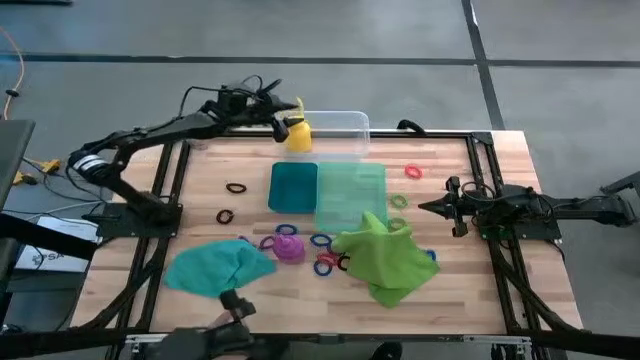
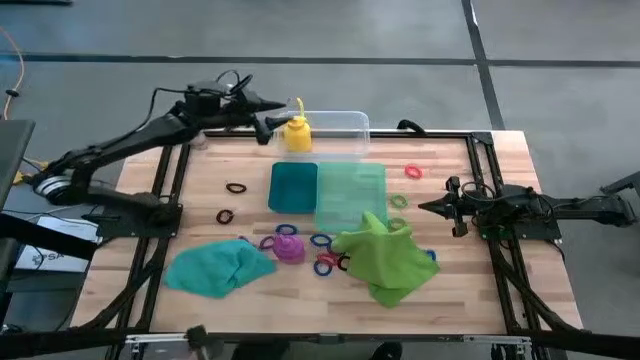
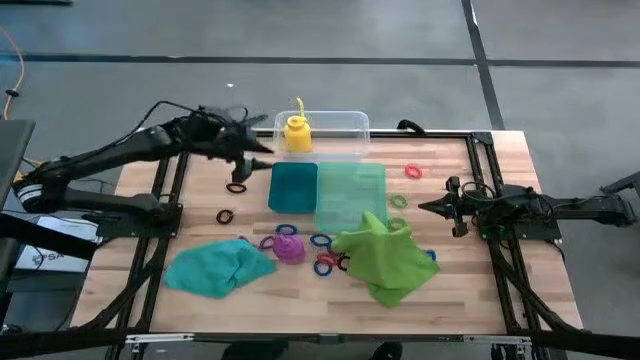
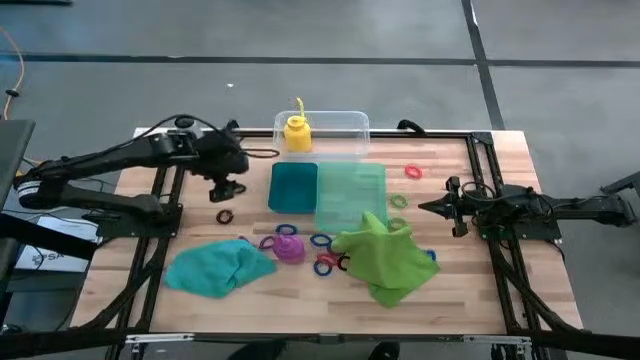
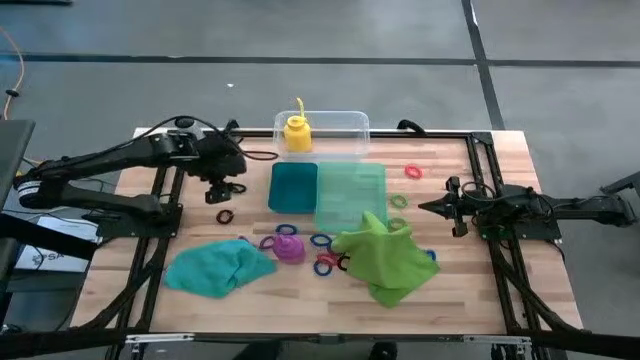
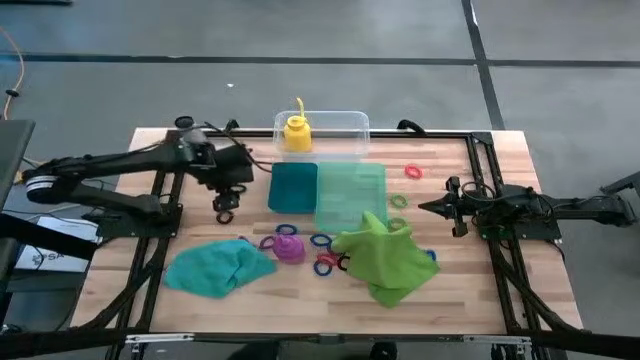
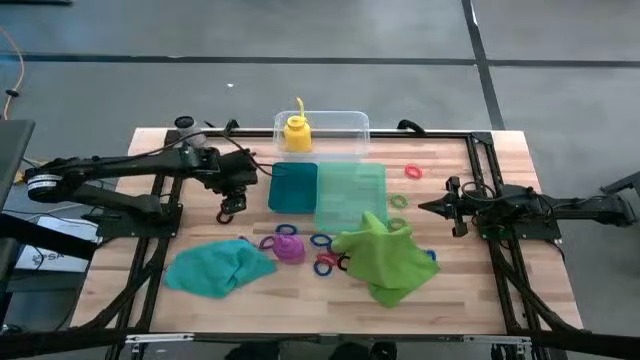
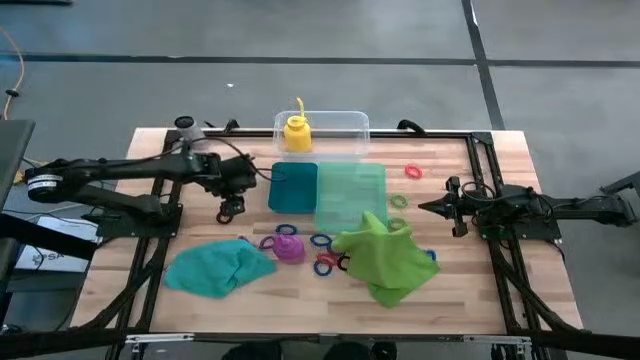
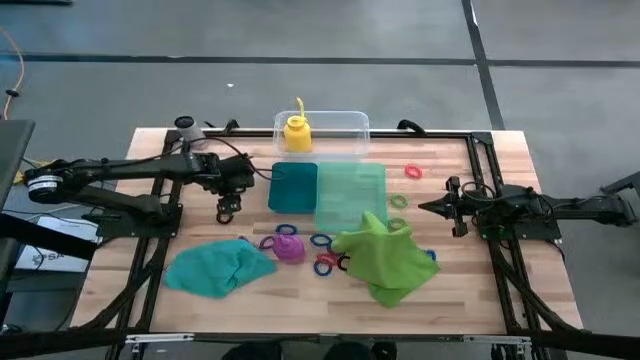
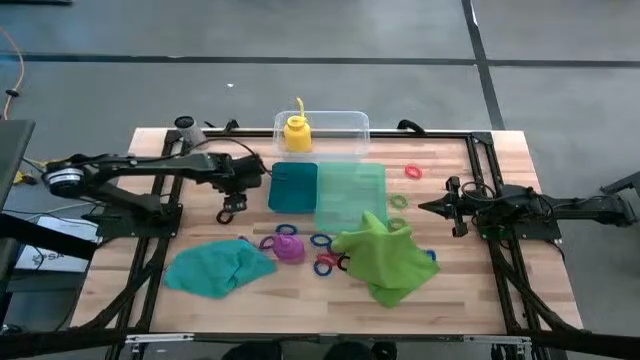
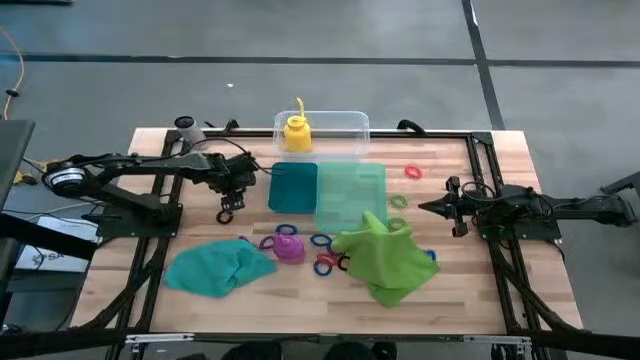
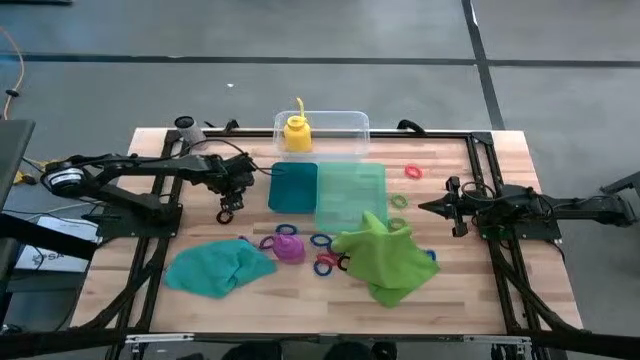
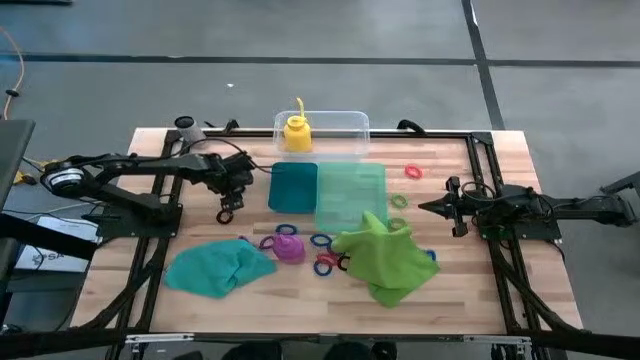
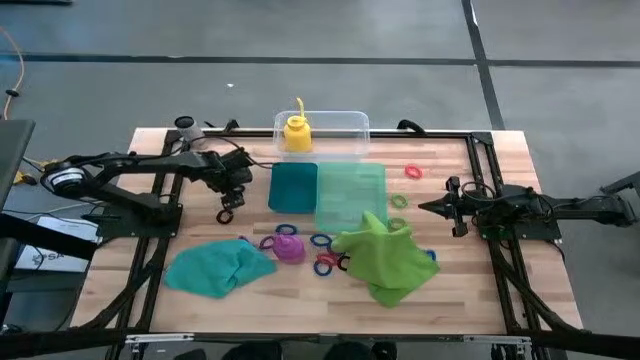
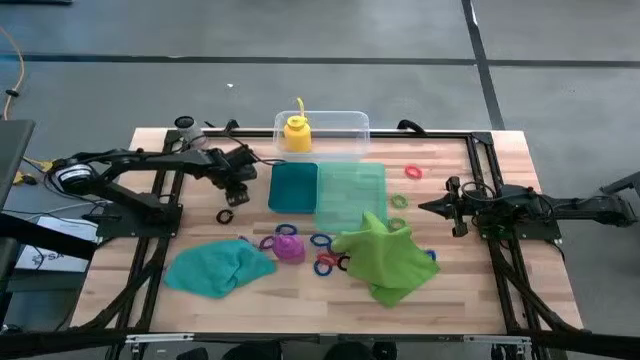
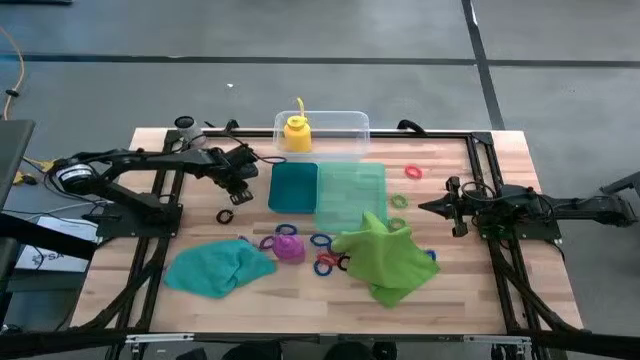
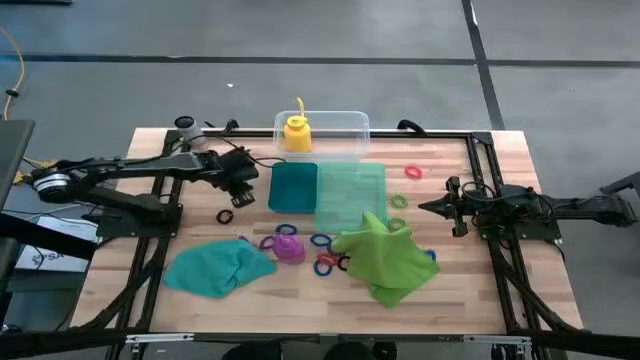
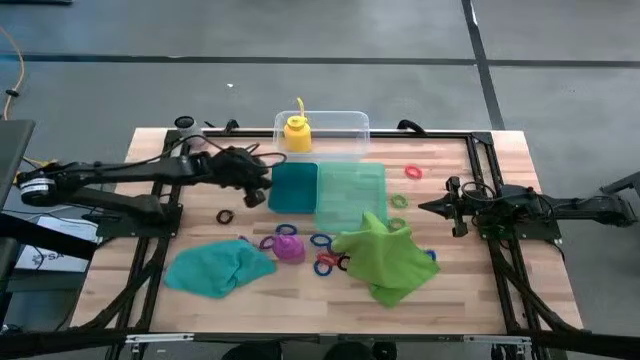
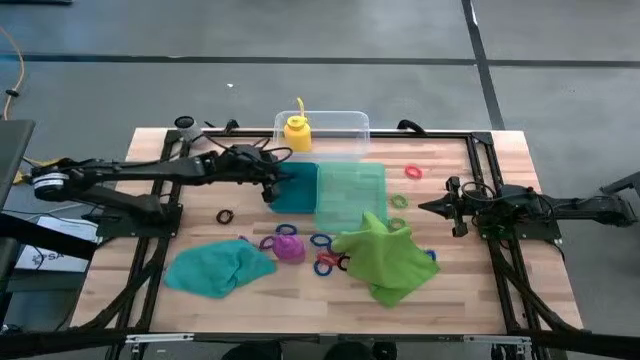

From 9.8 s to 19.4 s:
Task: Pick & Place Sports Items
Put the black spring keychain into the blue bin

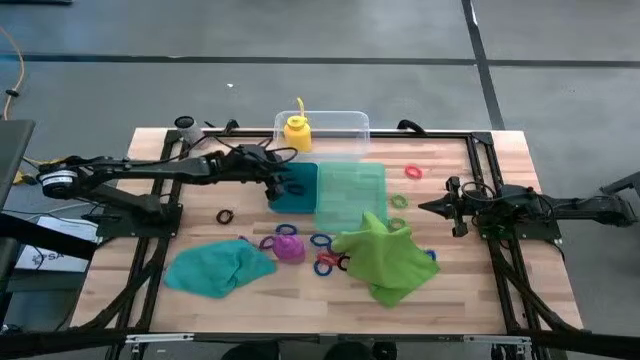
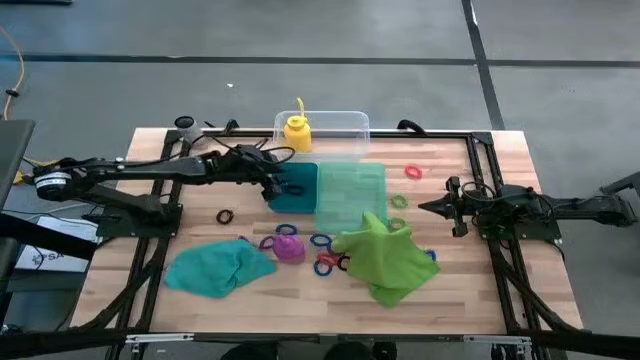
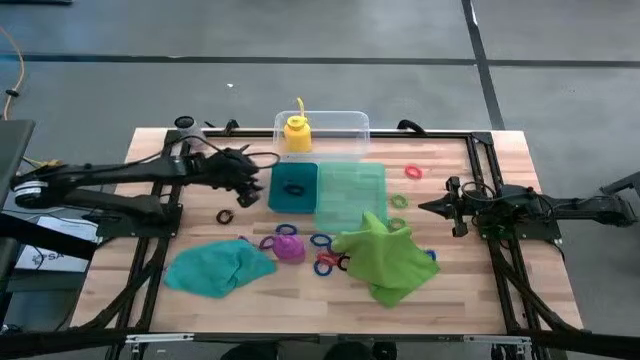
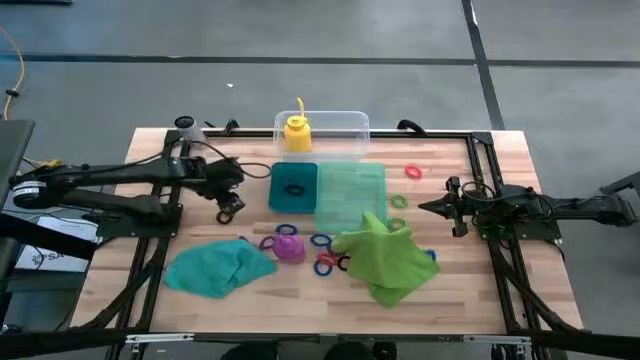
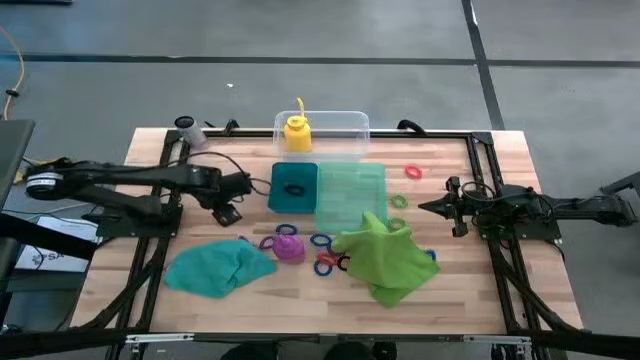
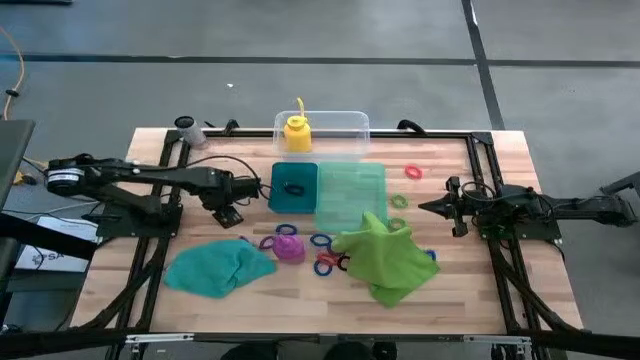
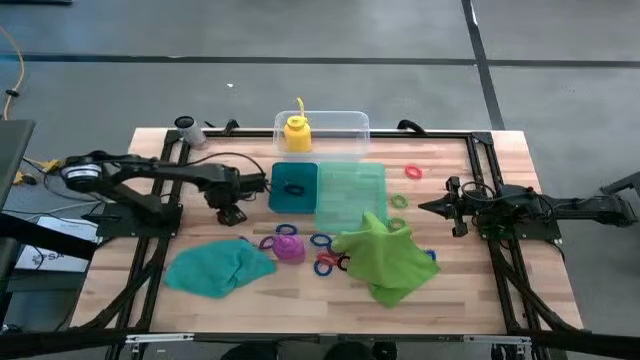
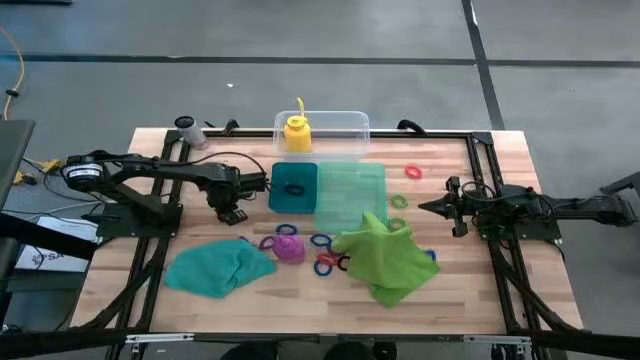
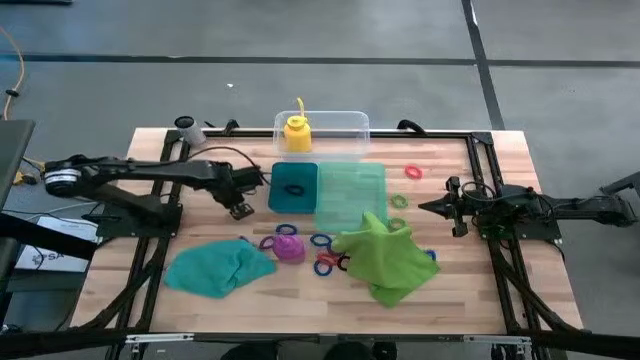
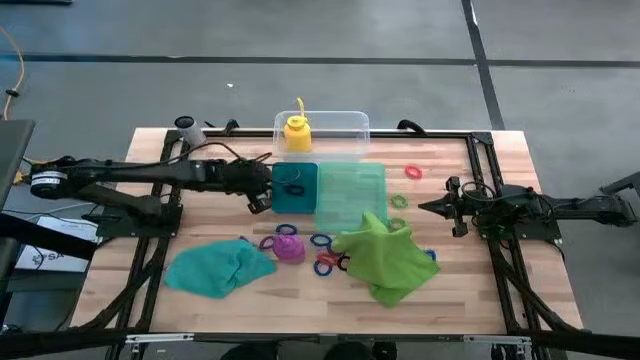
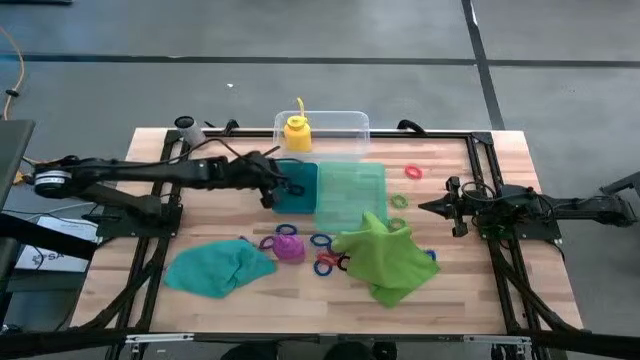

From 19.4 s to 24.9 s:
Put top black spring keychain into the blue bin

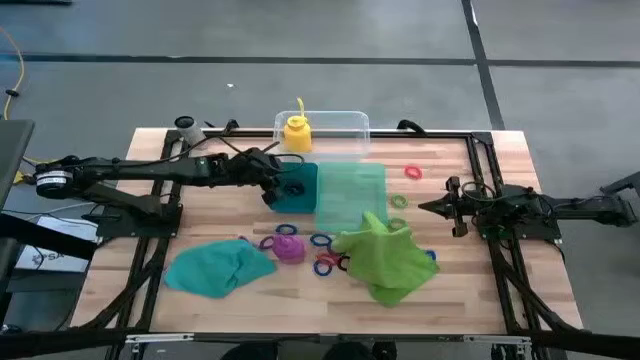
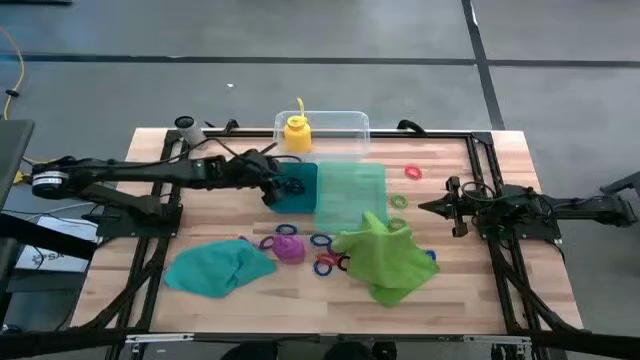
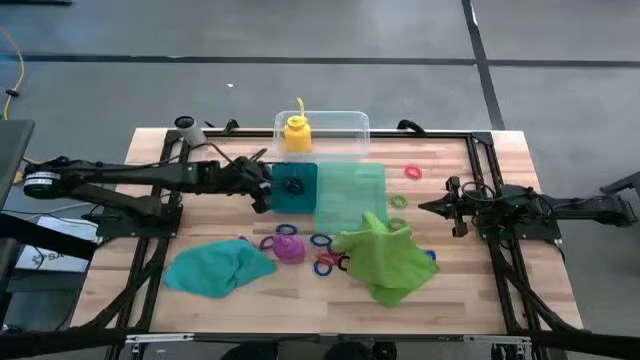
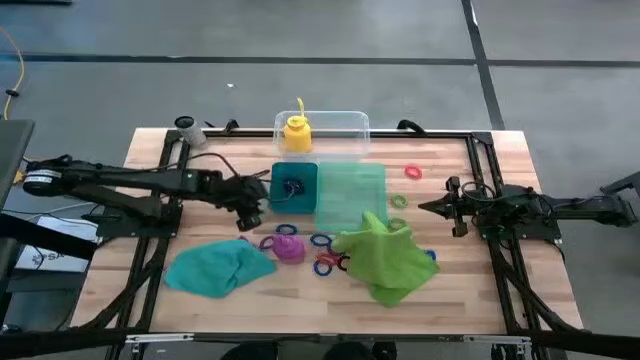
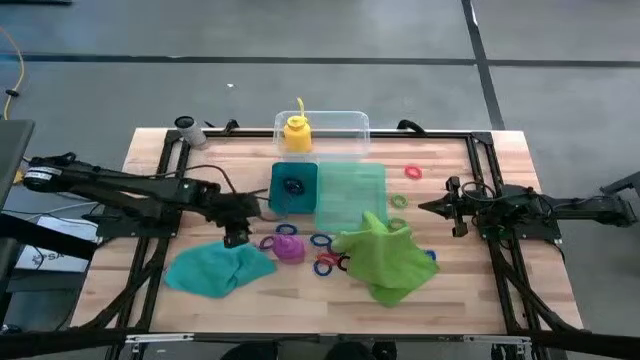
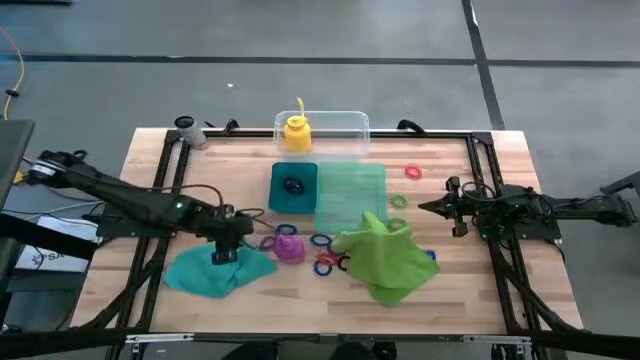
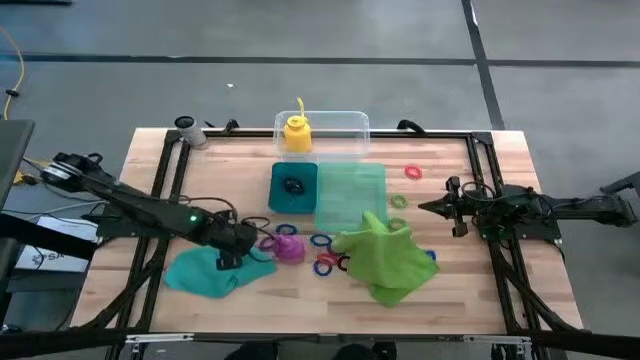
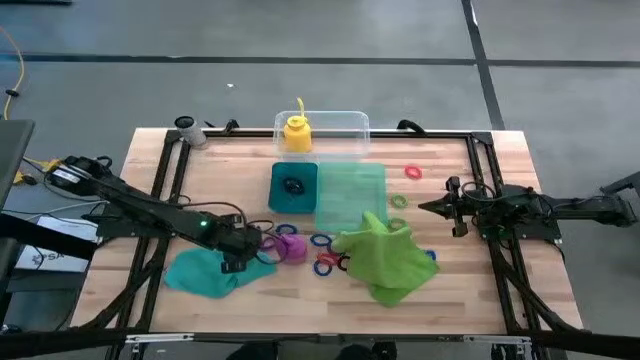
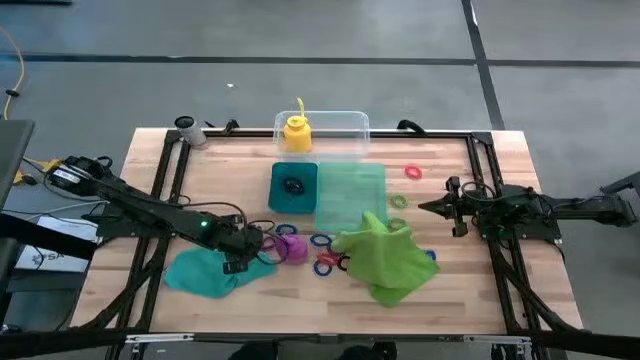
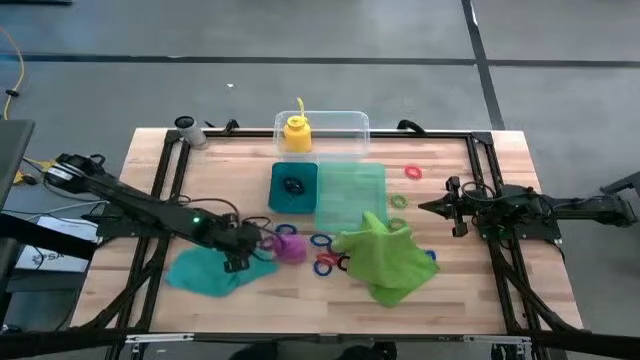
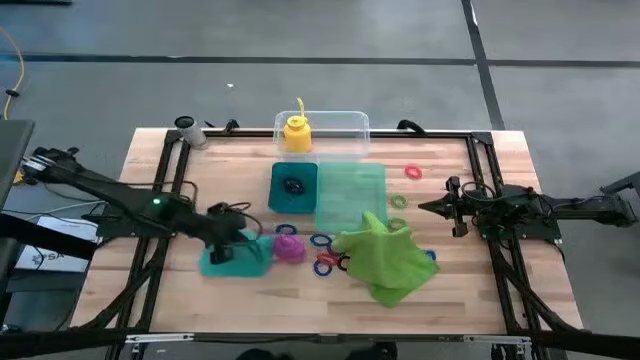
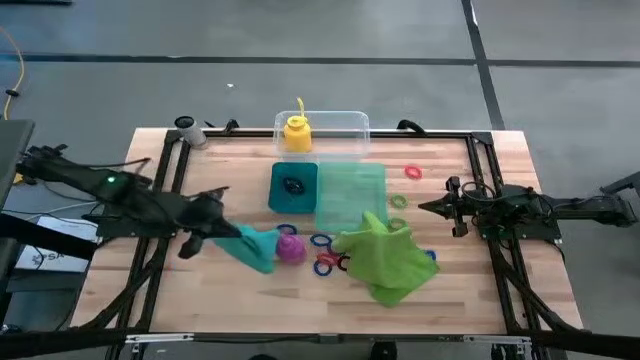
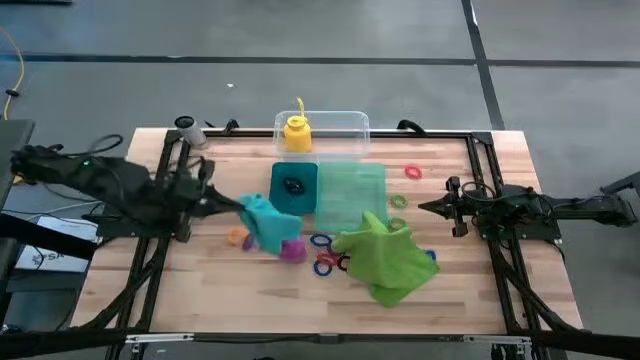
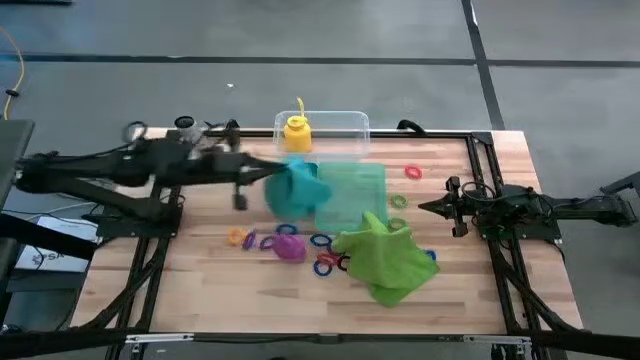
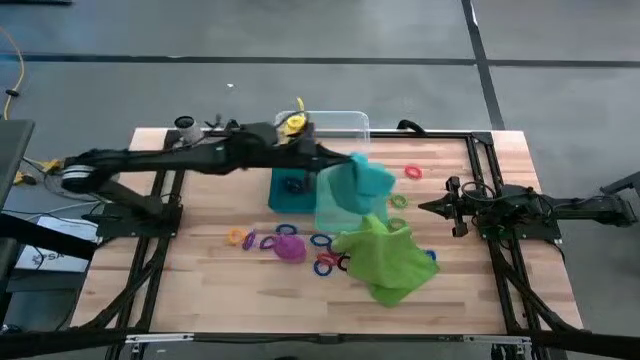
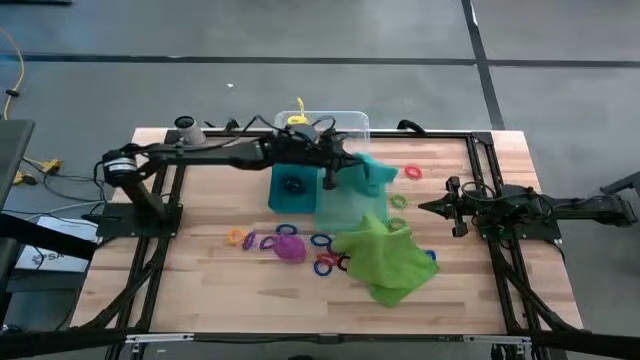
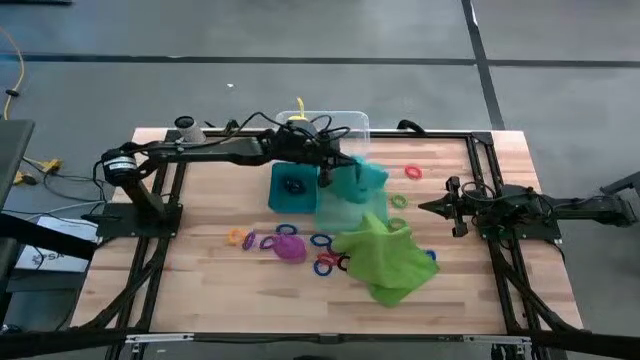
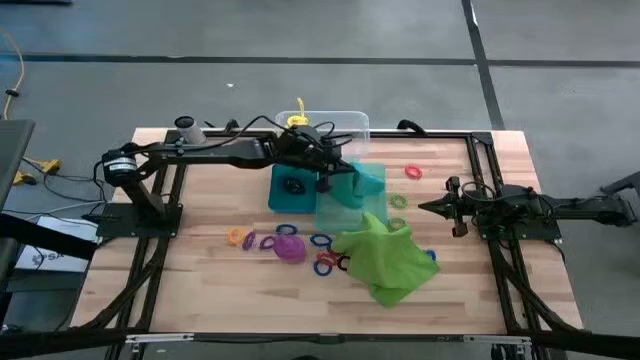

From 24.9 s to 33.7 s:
Put the blue towel into the green bin
